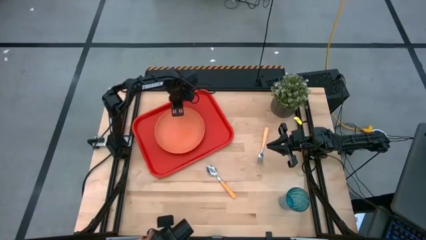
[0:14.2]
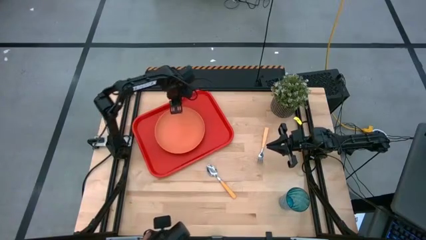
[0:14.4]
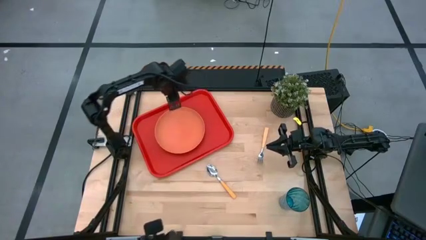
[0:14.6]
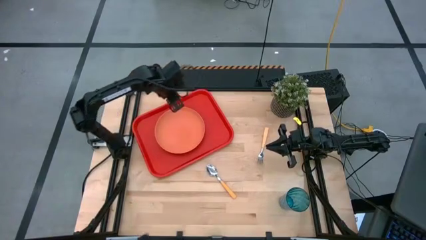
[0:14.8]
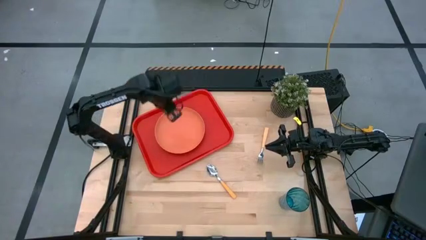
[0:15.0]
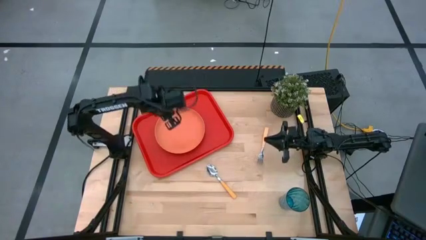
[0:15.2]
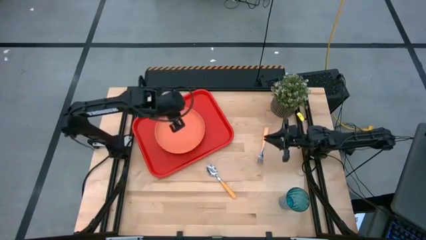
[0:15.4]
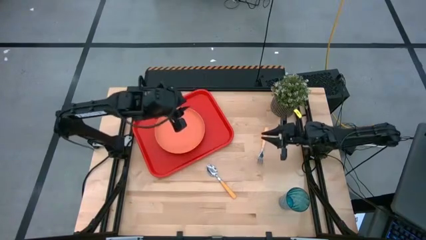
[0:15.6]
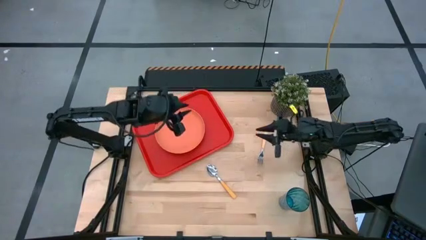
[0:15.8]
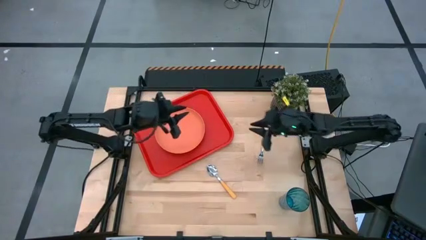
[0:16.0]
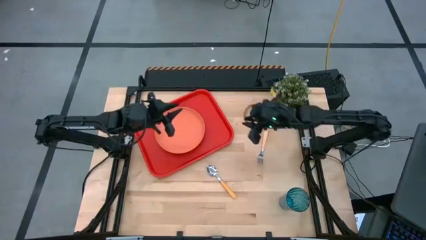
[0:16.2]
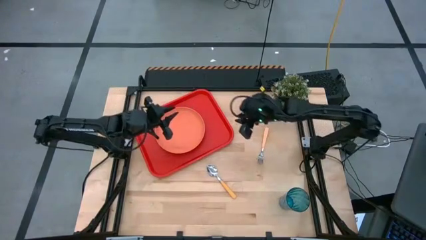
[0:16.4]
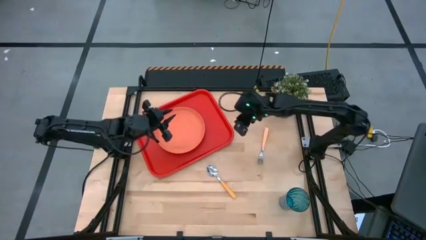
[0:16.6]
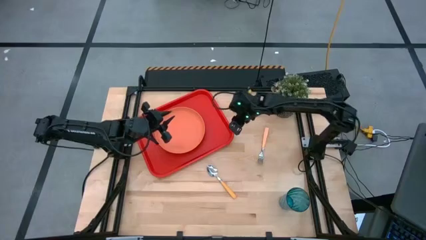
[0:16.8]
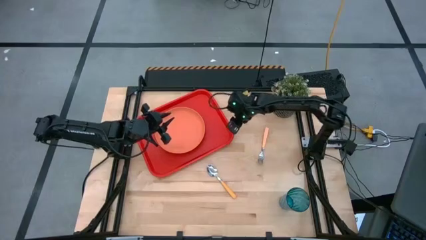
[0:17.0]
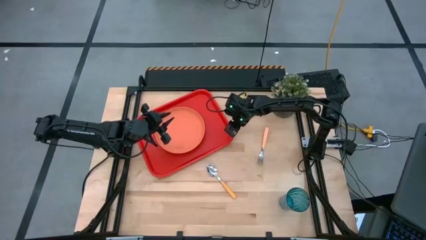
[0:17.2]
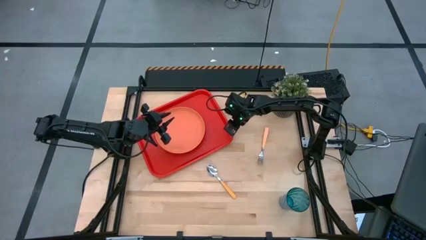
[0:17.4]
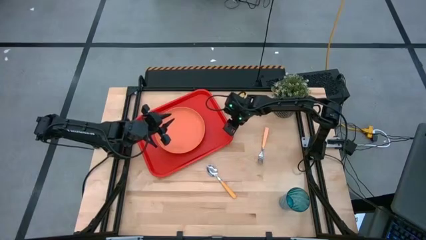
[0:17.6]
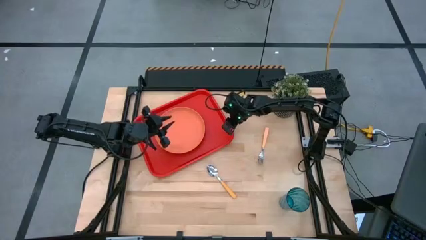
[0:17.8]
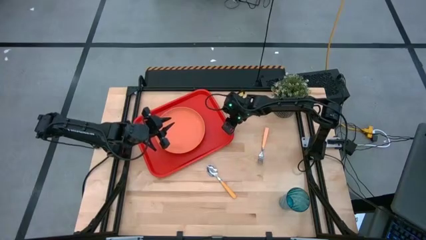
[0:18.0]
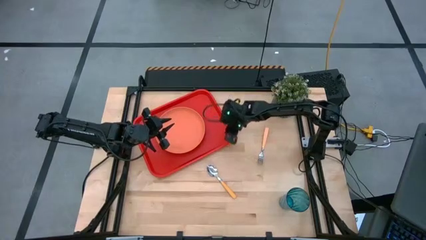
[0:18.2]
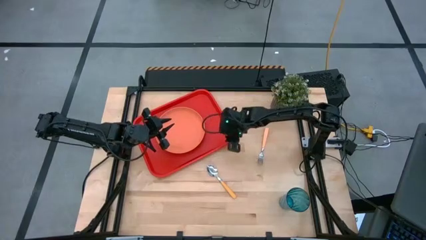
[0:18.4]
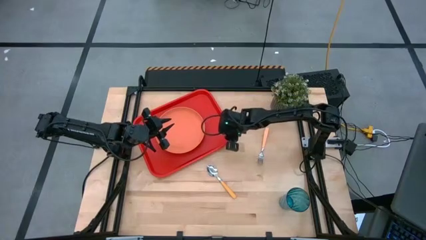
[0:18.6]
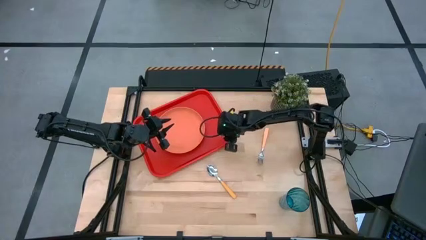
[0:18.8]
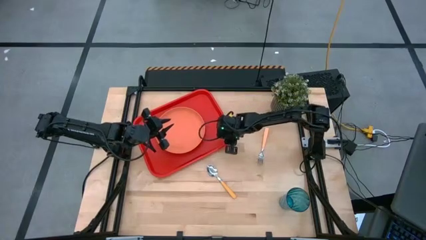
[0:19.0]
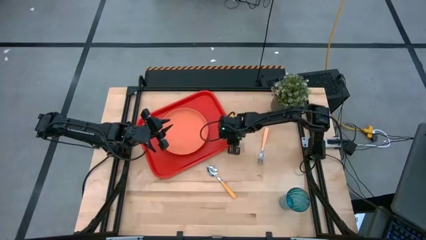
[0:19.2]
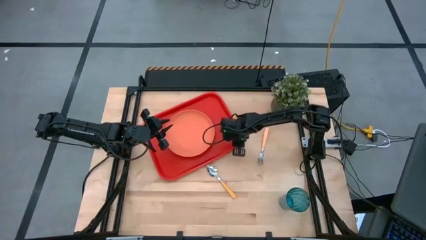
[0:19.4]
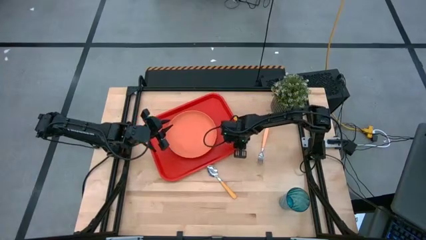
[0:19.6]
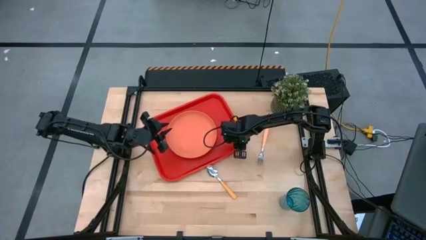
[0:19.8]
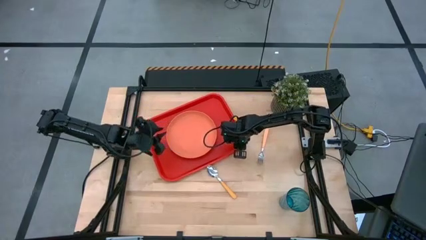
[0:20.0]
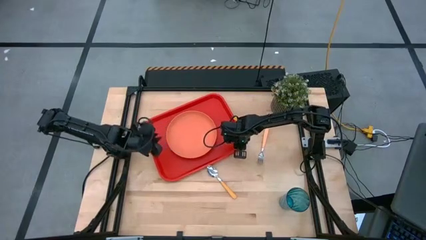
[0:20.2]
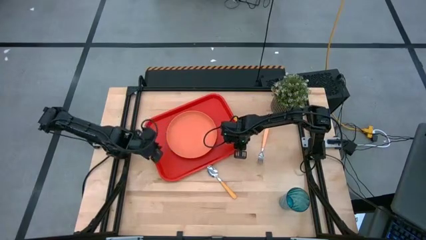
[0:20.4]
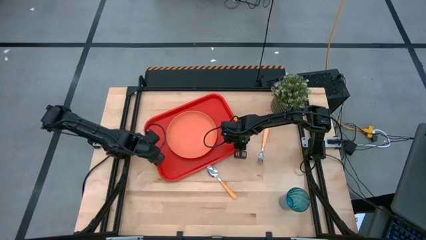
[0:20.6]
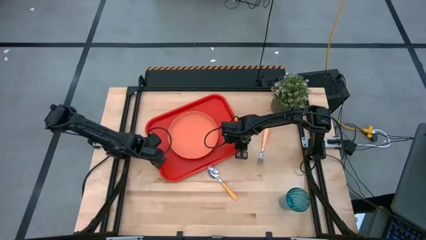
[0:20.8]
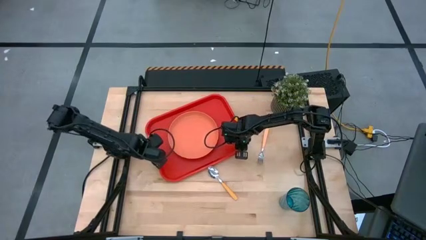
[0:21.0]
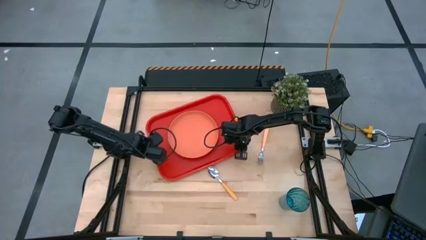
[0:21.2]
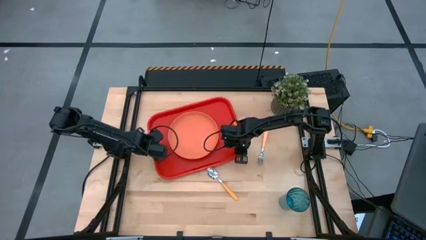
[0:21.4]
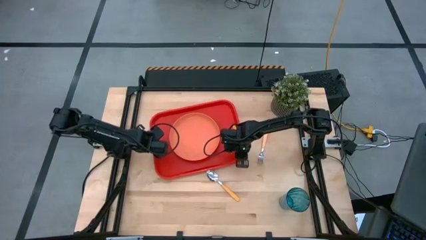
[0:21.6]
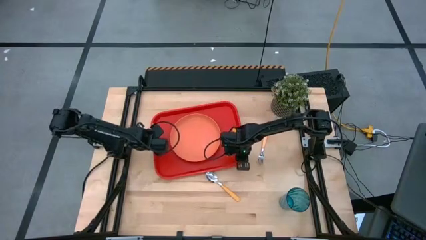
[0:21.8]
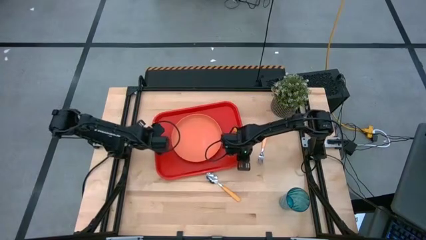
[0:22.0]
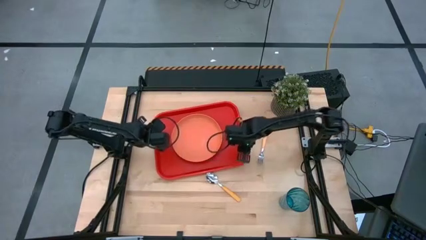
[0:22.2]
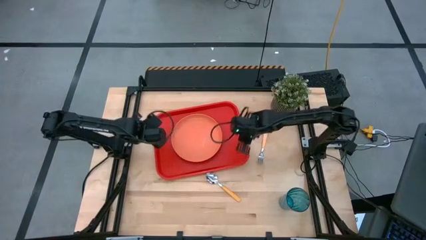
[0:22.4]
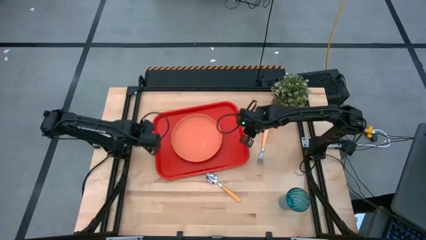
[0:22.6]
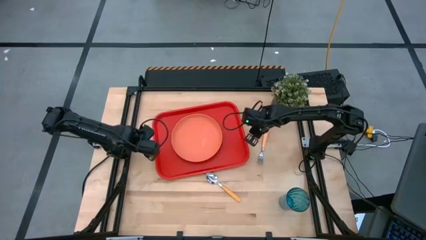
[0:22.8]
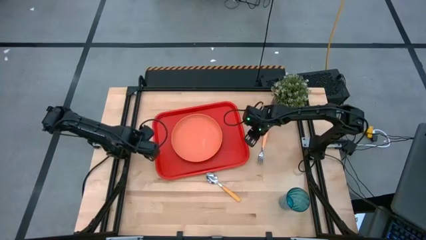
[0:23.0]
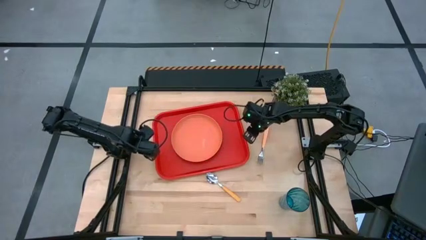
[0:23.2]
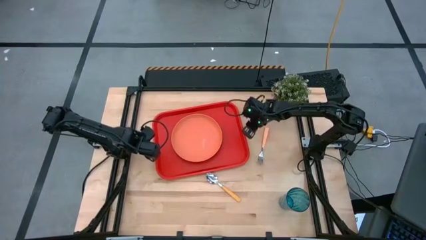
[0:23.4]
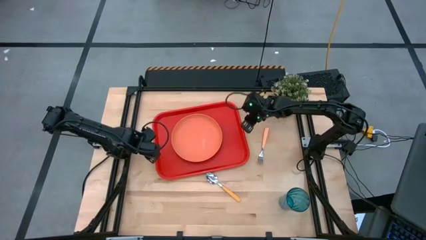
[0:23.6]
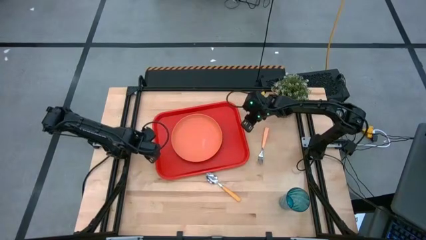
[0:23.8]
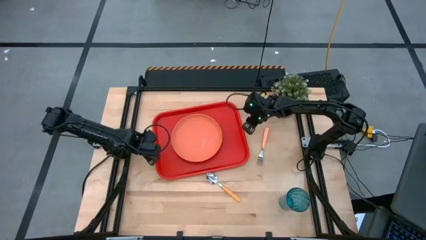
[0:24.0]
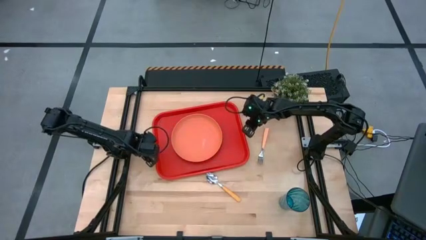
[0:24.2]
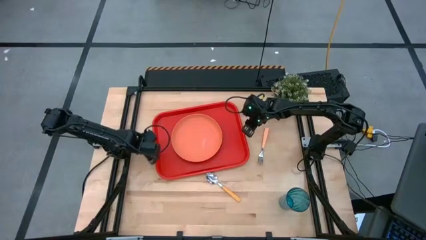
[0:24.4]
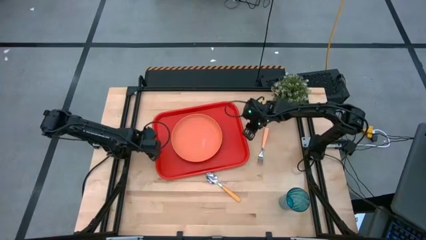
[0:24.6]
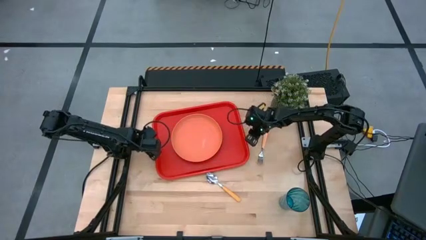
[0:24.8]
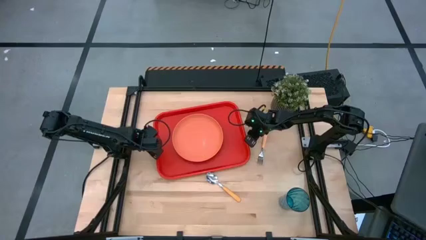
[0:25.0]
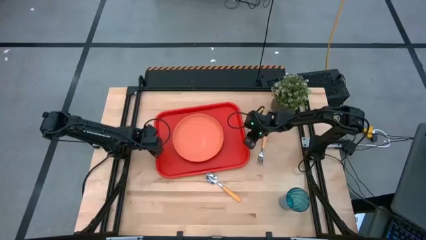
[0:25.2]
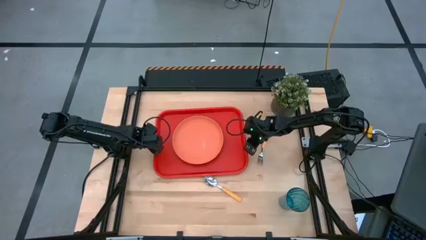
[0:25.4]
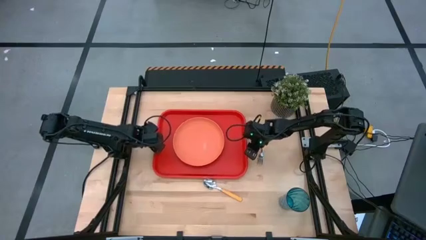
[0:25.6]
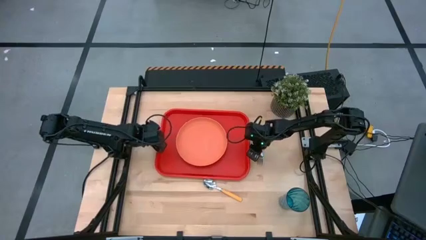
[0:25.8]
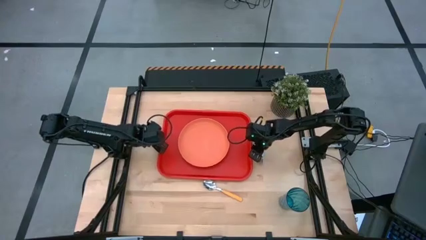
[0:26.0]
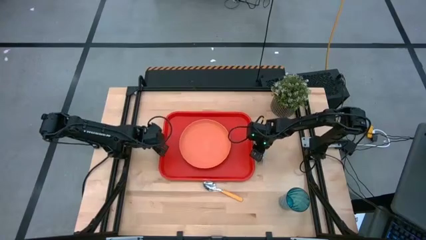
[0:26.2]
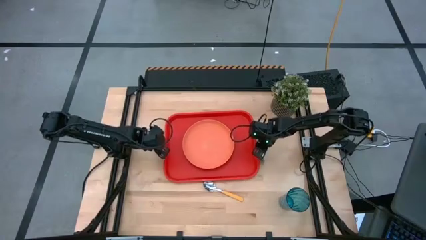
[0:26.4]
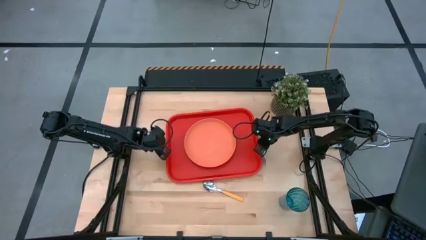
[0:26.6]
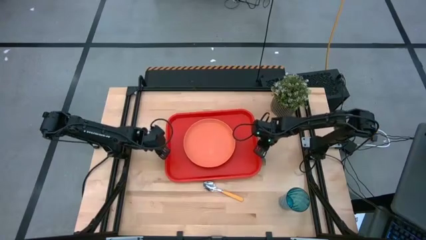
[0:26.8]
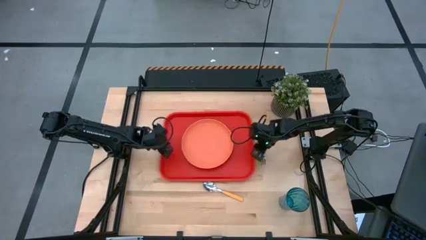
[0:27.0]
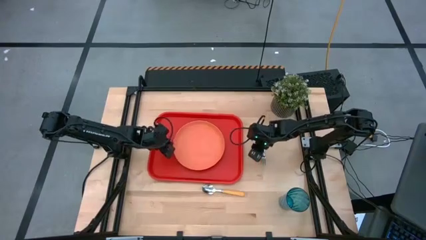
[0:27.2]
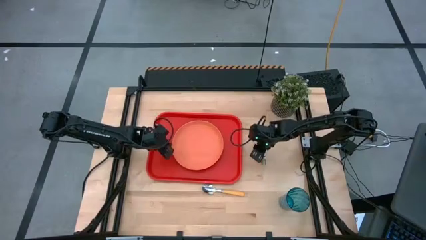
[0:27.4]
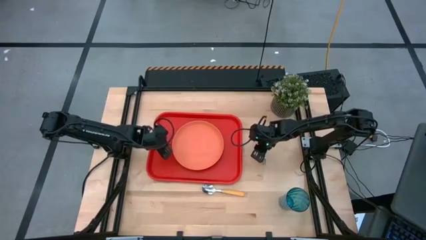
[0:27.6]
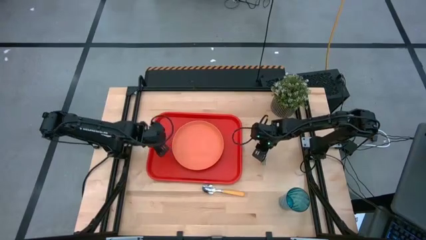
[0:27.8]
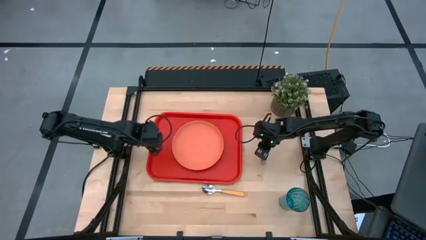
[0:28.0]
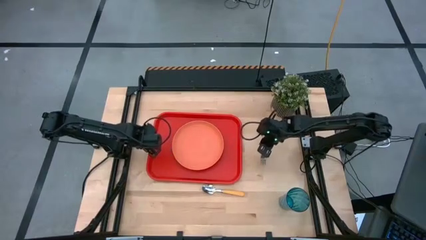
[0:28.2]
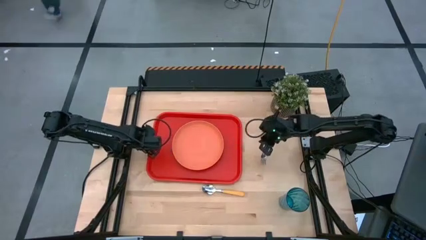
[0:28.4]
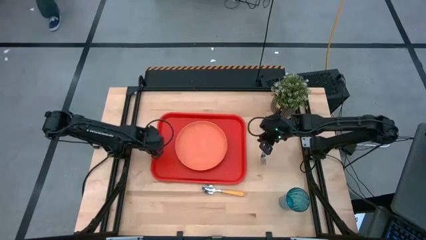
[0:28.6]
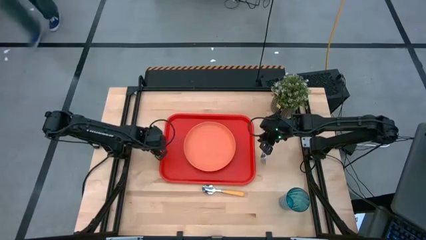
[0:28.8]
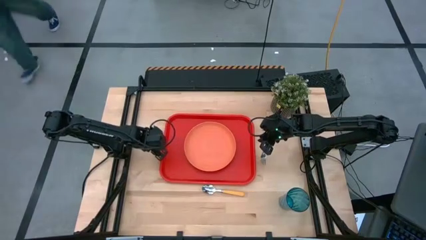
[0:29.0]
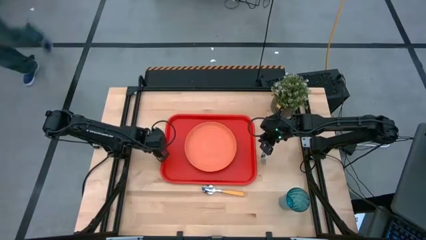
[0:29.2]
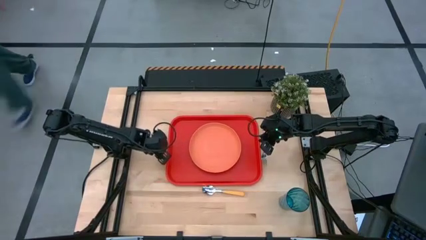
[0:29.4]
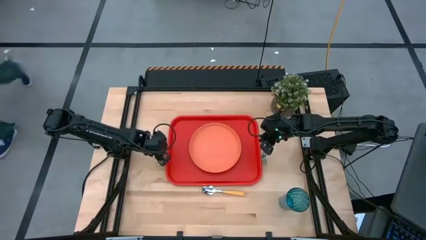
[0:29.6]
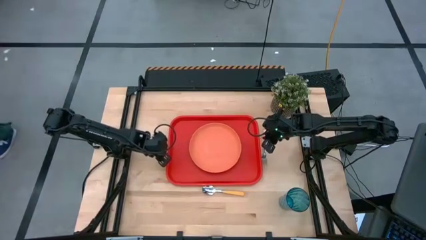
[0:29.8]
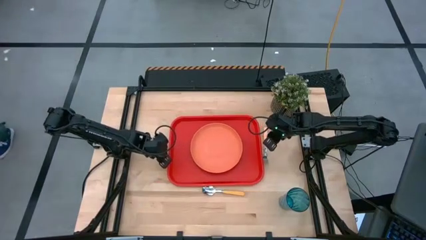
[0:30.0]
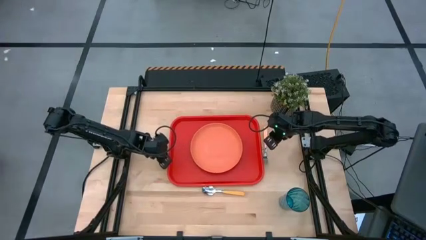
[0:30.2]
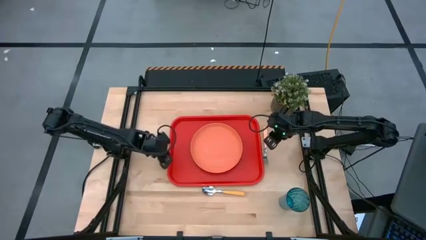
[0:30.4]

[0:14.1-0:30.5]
Task: Pick and place plate/cup/fork/spoon on tray
Move the orange serving tray to the center of the table
